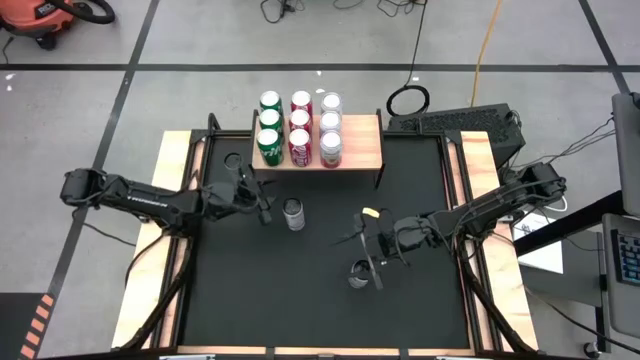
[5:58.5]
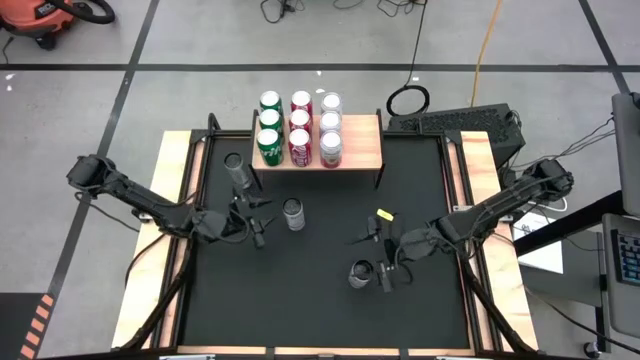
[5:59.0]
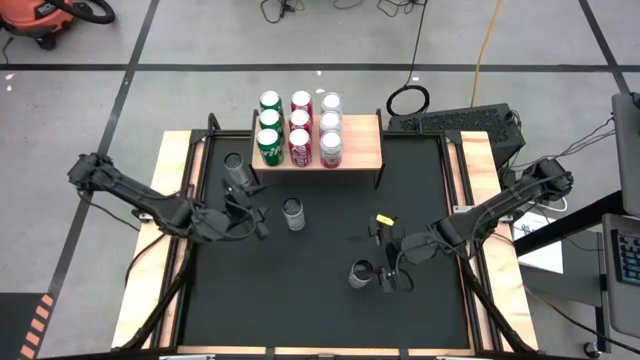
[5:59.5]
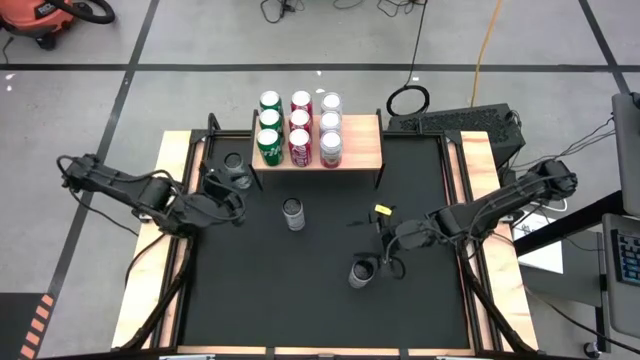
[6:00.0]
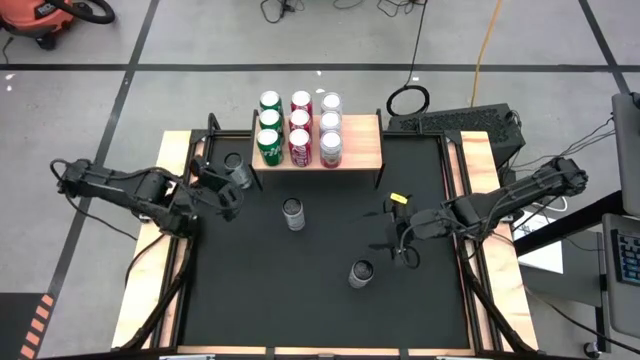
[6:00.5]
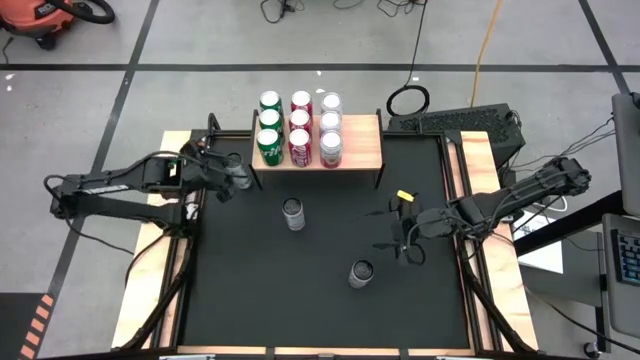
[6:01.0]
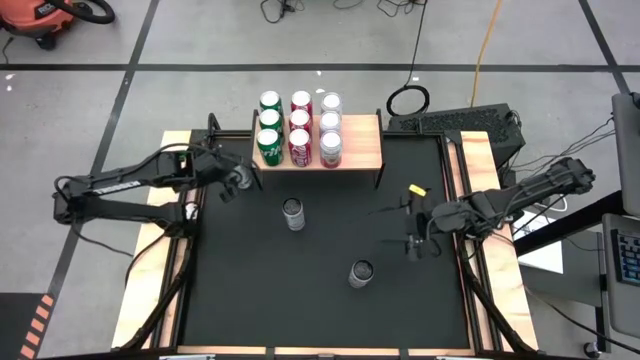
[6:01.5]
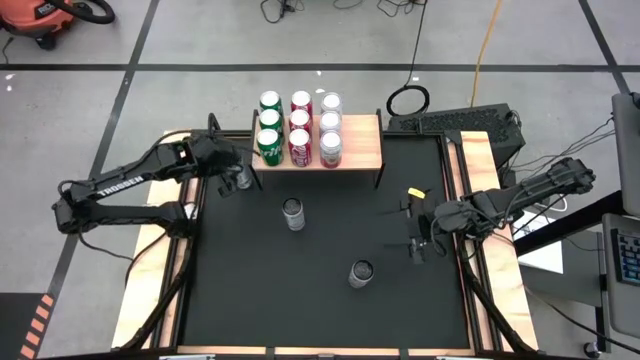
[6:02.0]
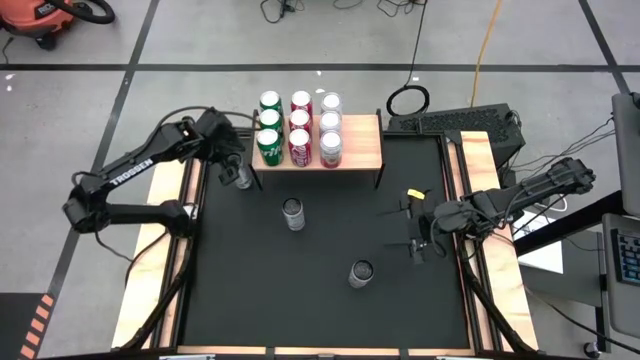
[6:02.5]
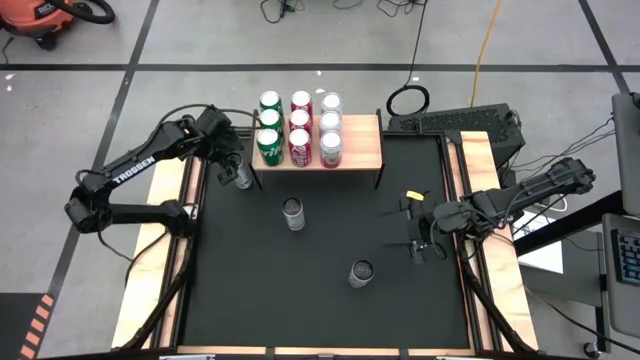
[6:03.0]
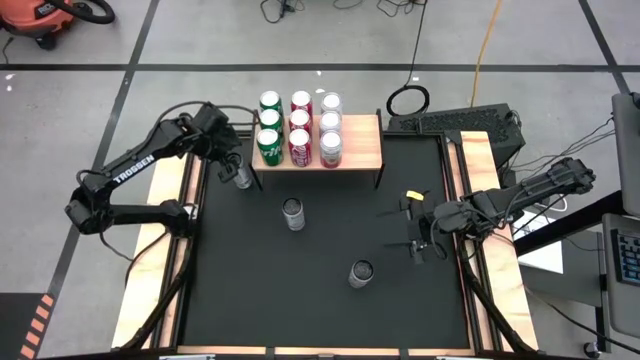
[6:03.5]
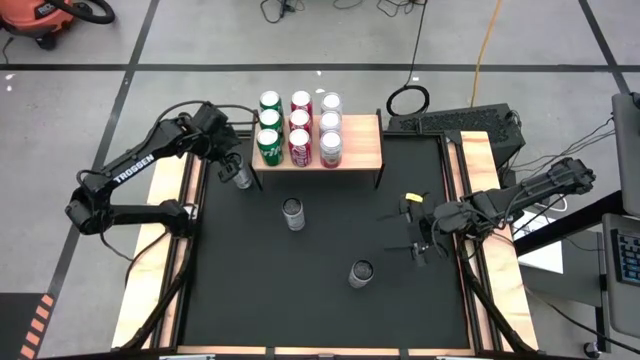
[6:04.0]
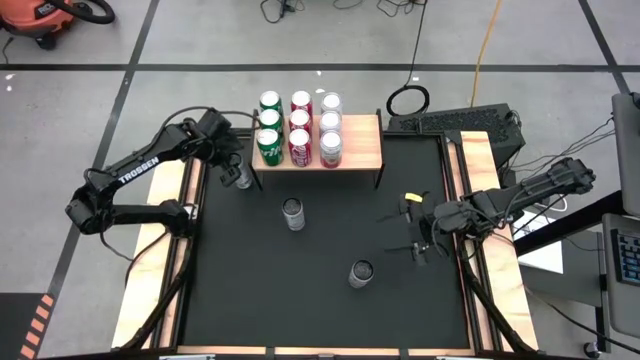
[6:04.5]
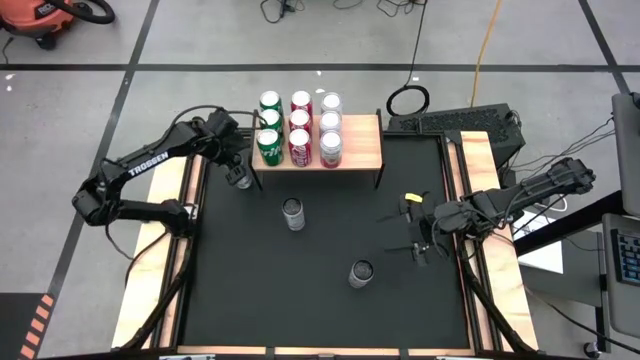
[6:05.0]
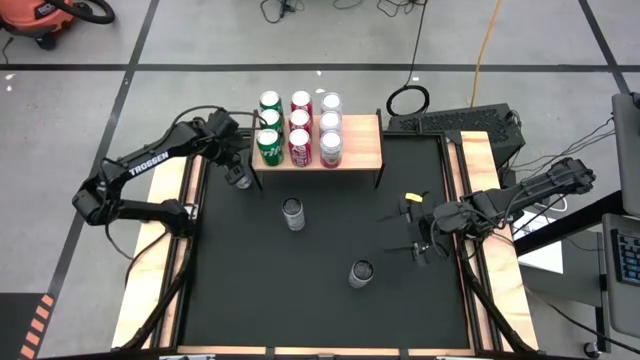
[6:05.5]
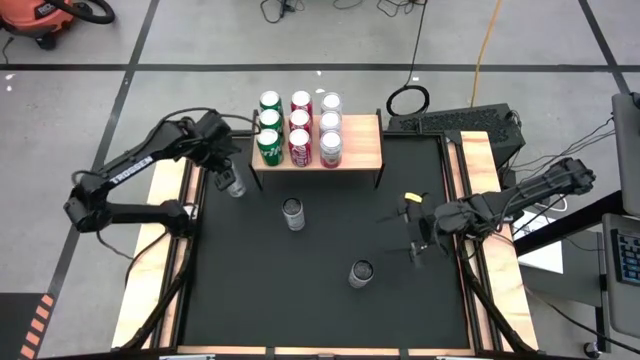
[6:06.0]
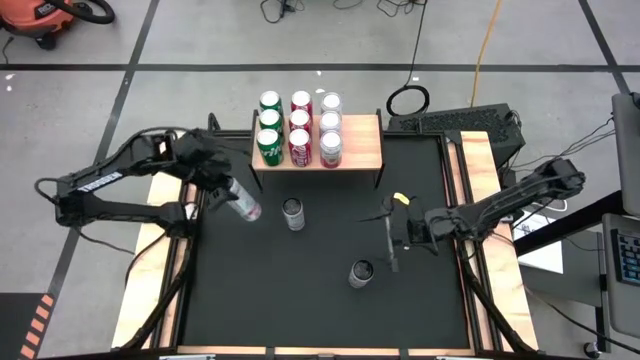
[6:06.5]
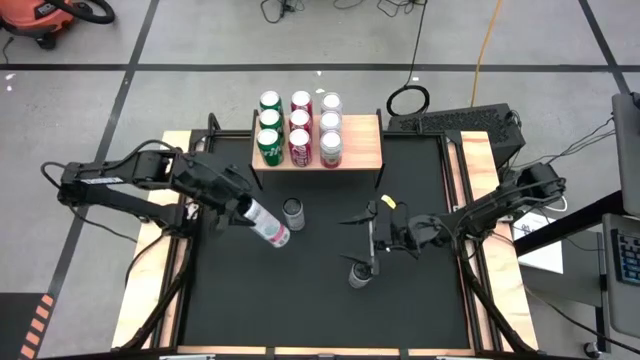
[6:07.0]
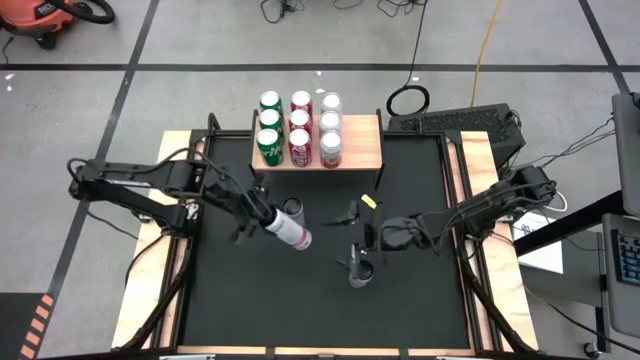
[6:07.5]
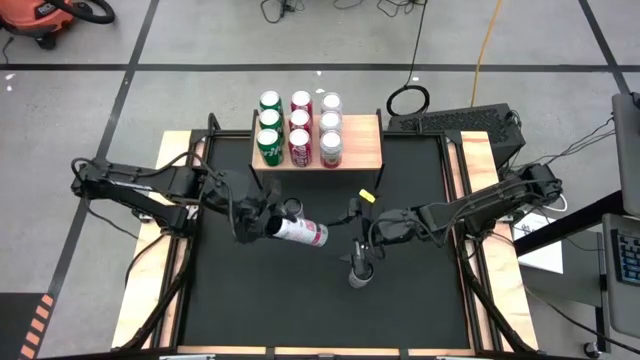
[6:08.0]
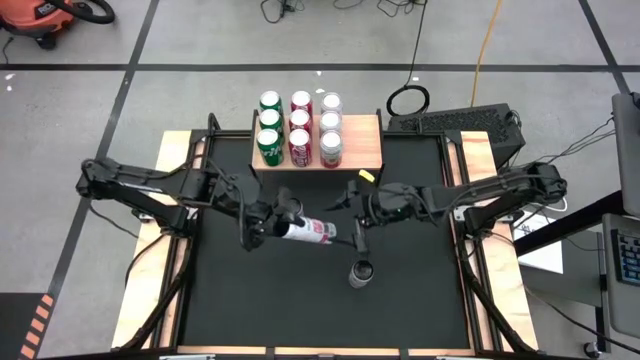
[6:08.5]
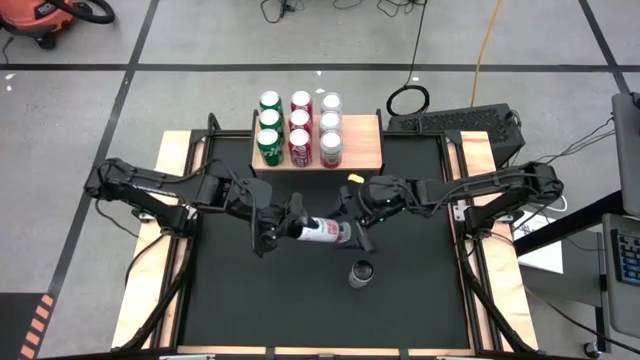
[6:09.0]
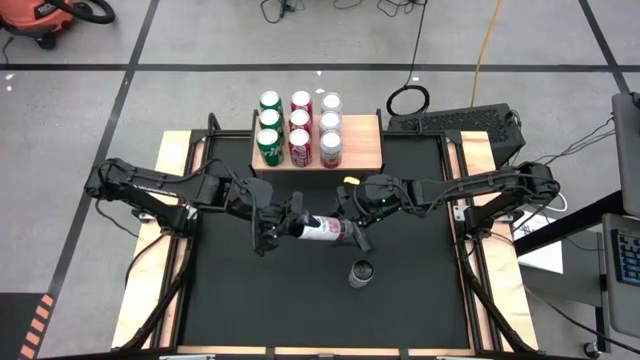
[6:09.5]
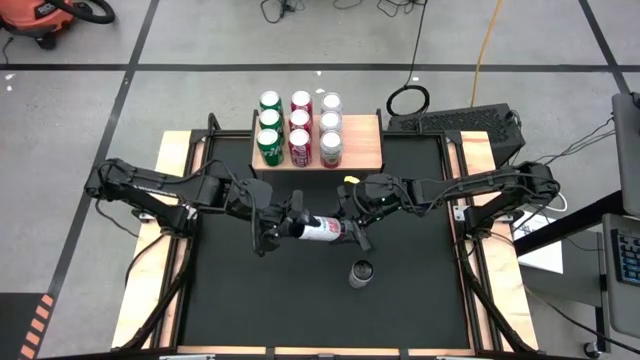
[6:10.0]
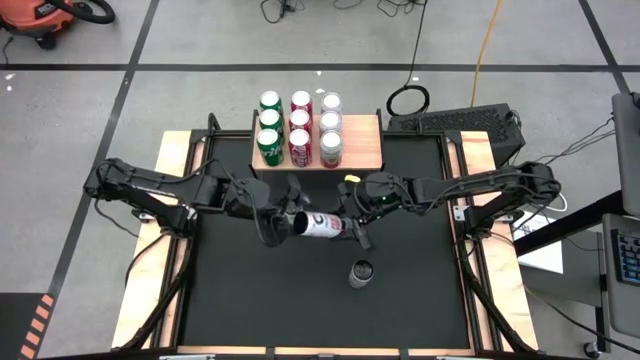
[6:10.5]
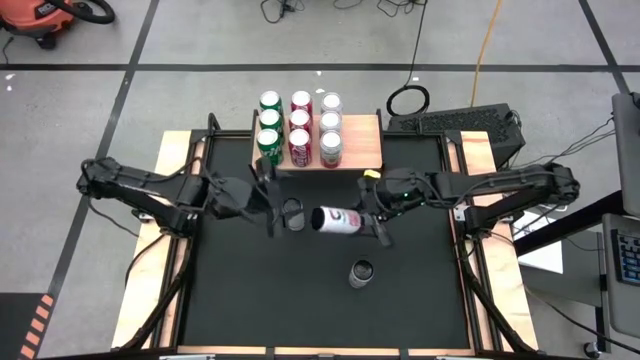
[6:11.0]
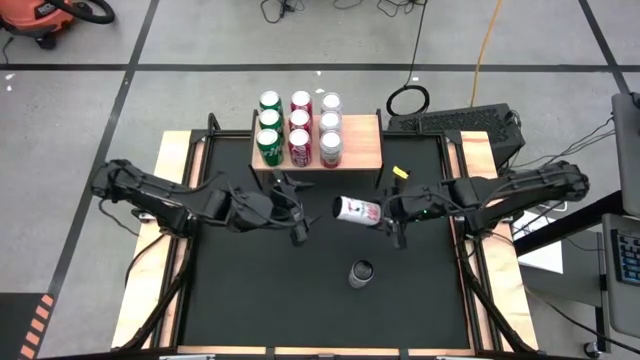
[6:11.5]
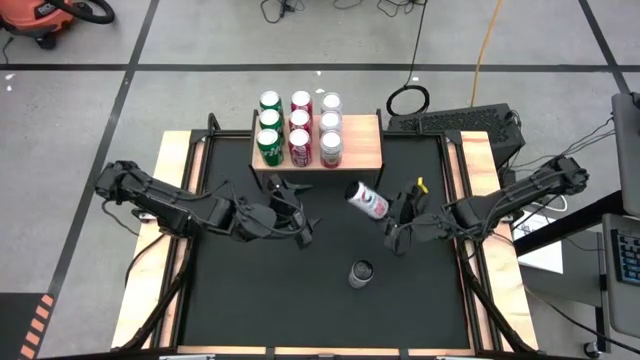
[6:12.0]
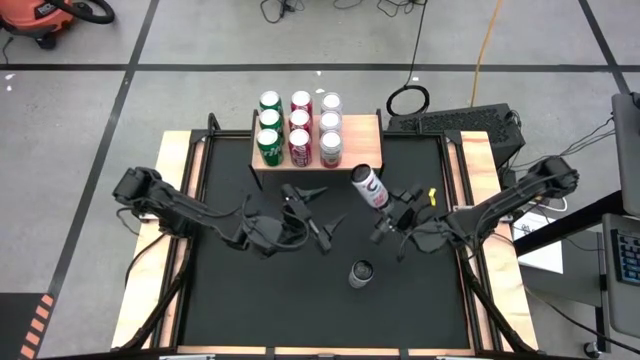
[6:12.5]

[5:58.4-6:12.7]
Task: Place canned beverage on shelf
Put the top white soda can on the shelf

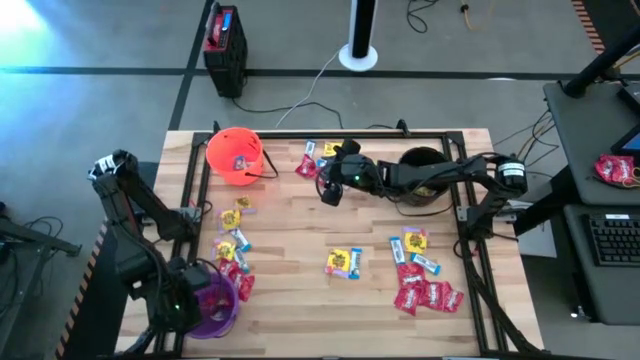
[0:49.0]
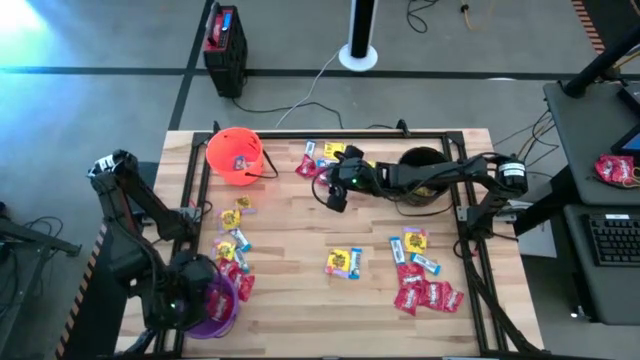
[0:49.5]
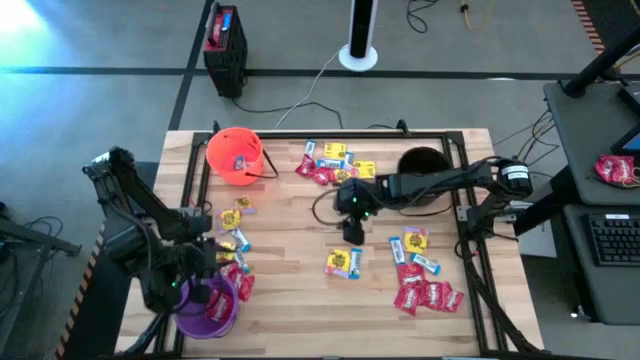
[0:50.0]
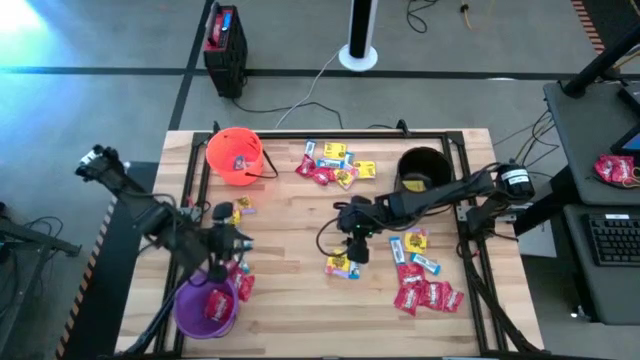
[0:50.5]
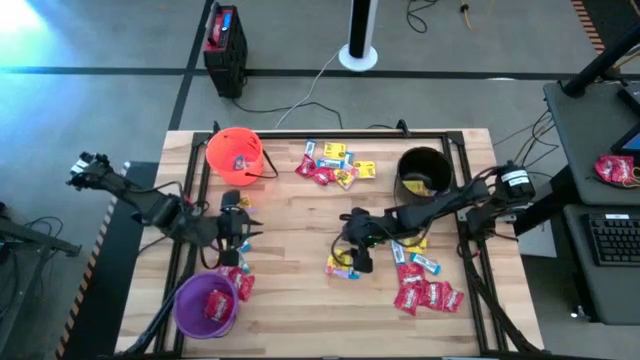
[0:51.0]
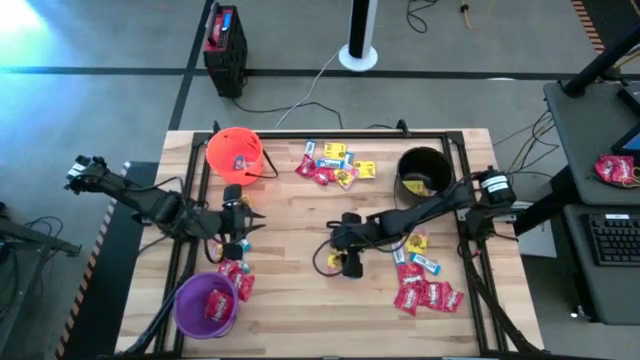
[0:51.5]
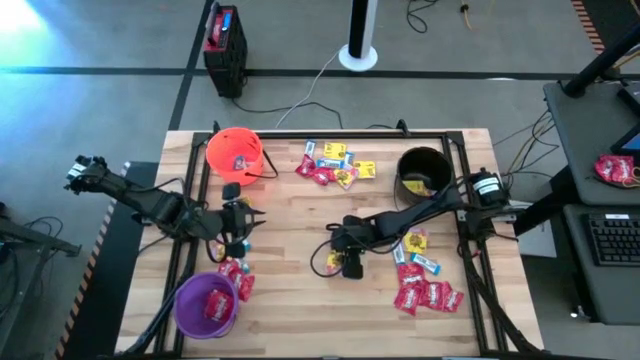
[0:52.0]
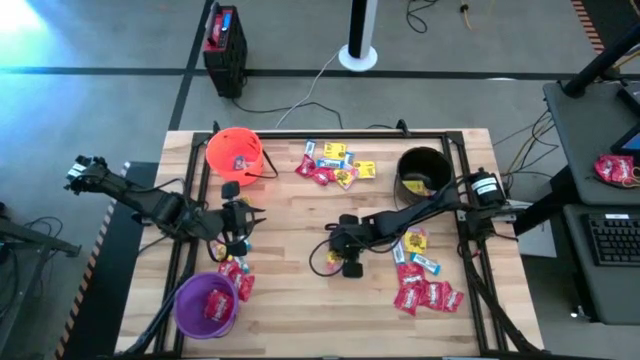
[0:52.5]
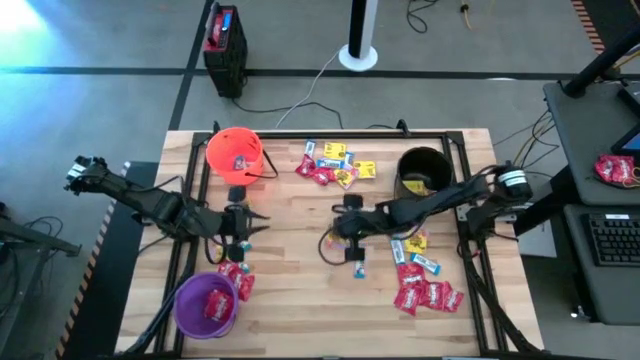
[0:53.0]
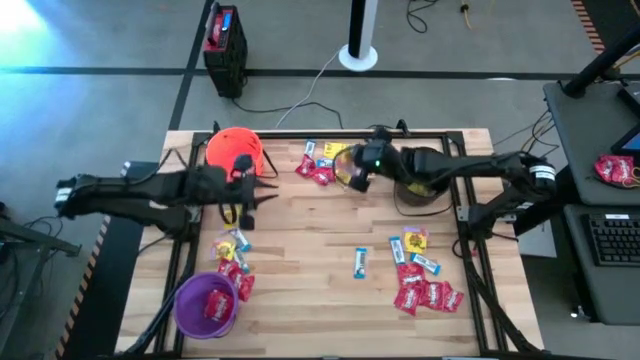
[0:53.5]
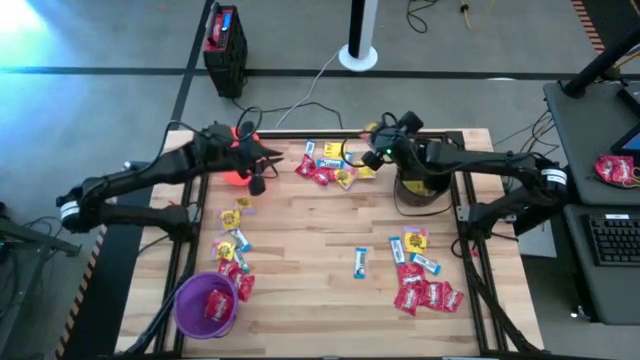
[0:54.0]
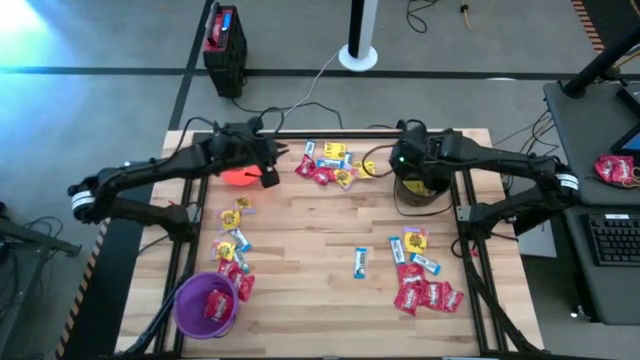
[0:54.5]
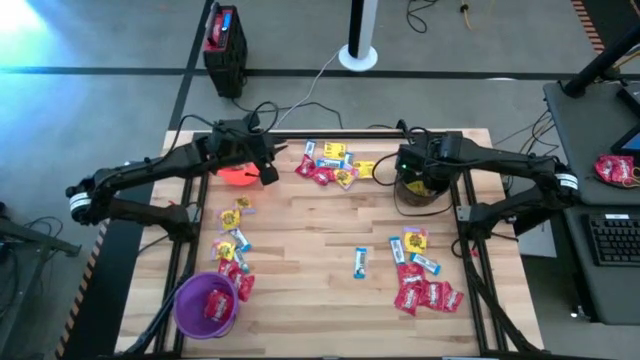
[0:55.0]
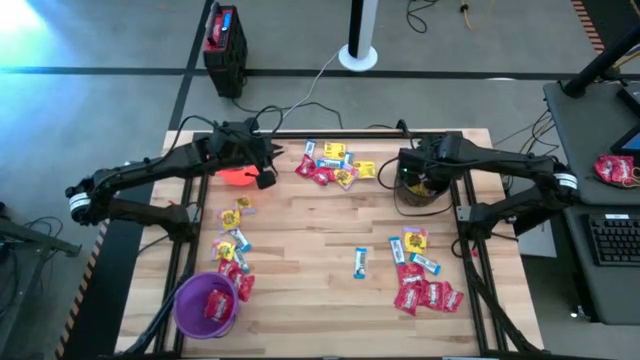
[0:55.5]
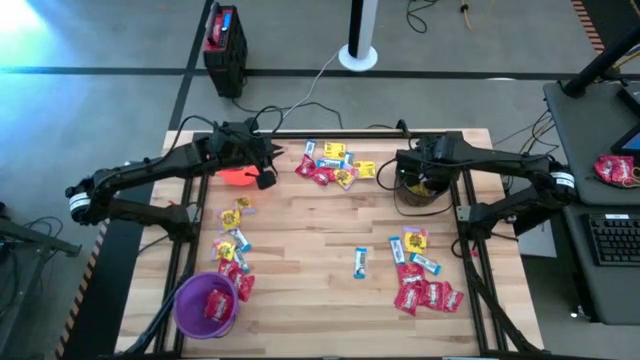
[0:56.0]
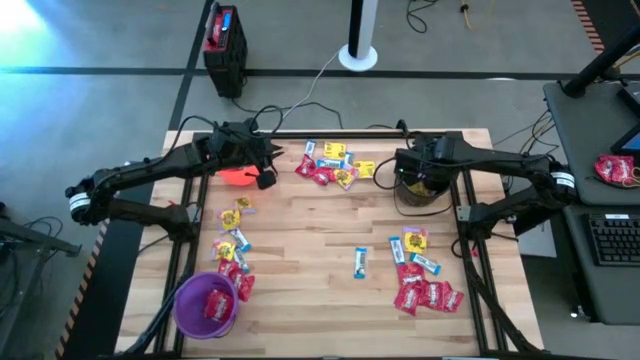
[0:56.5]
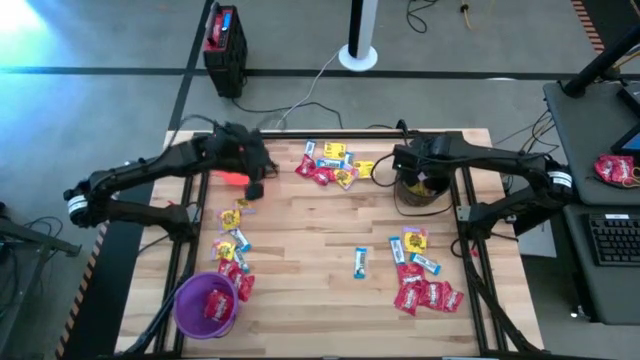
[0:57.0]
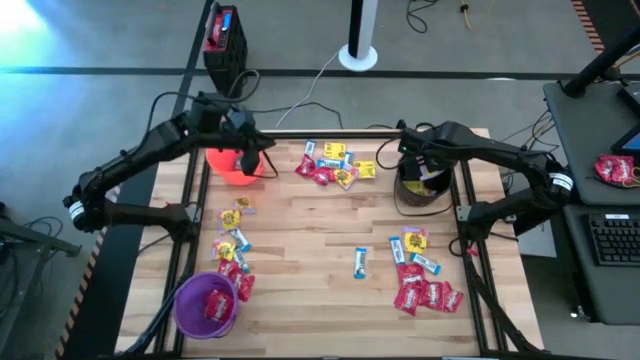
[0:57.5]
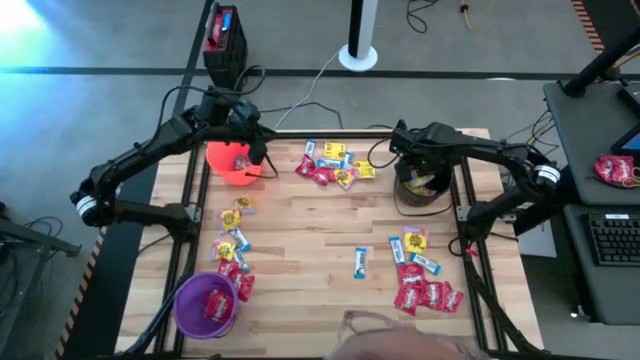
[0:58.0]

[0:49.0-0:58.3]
Task: Sort candy by brand, put in halloween buckets
Put the yellow candy into the black bucket
